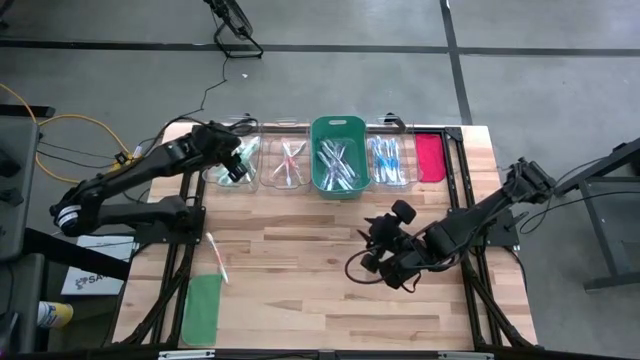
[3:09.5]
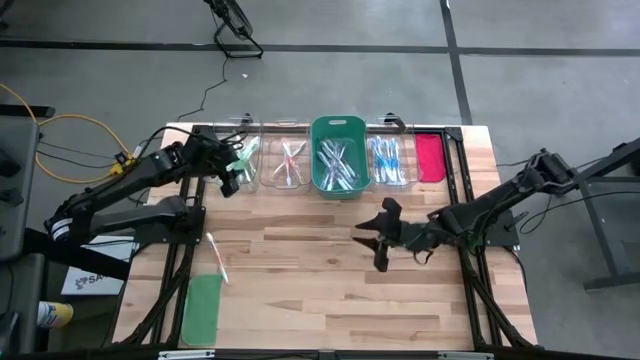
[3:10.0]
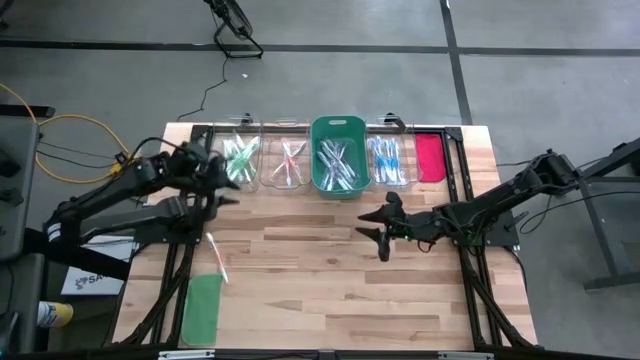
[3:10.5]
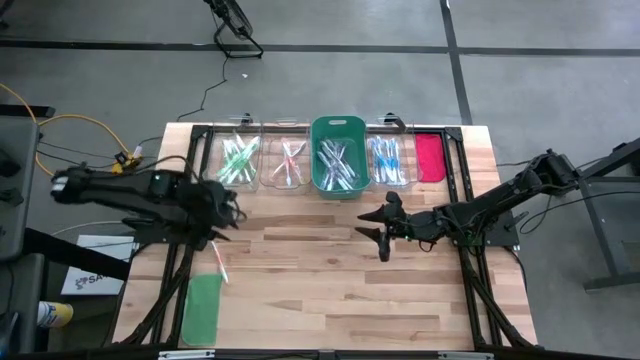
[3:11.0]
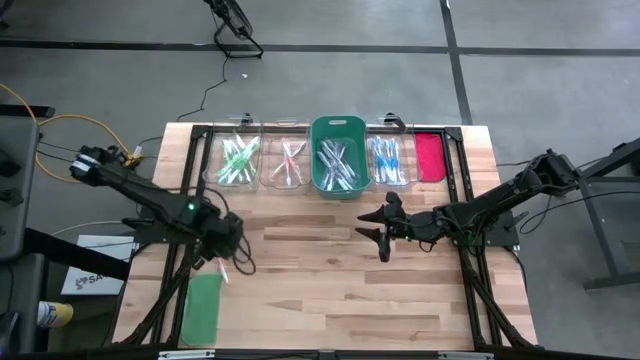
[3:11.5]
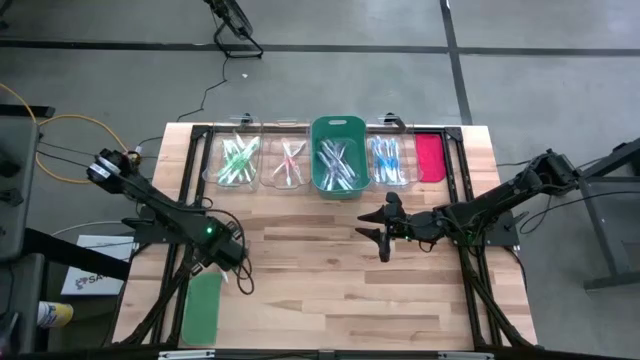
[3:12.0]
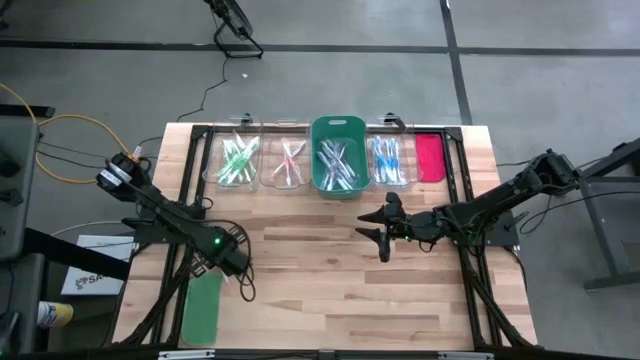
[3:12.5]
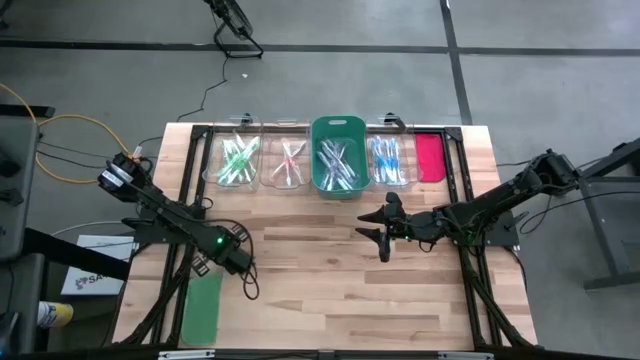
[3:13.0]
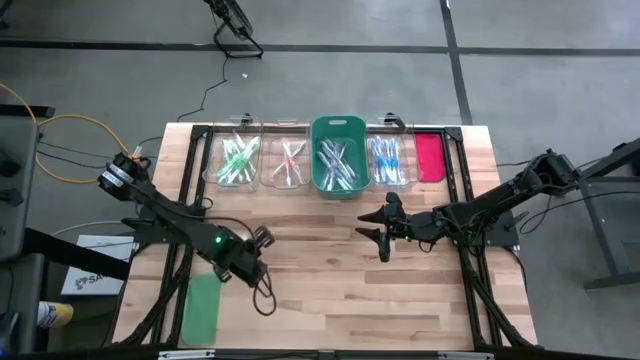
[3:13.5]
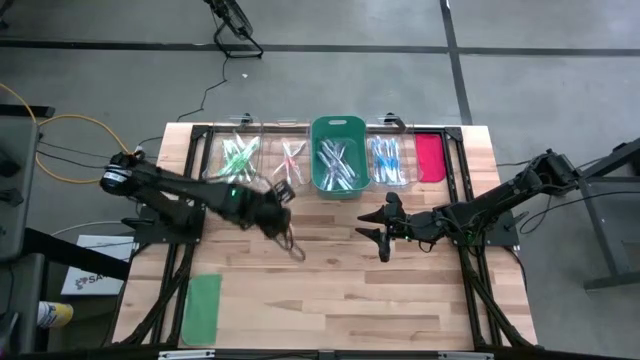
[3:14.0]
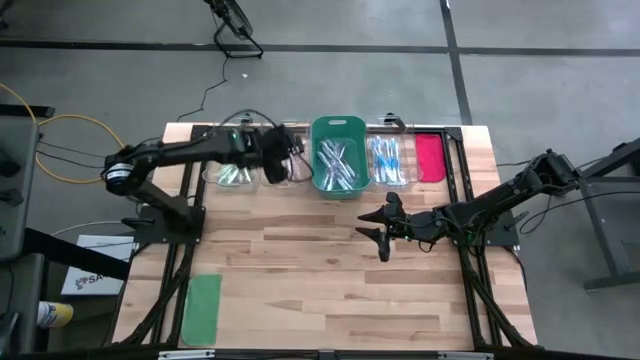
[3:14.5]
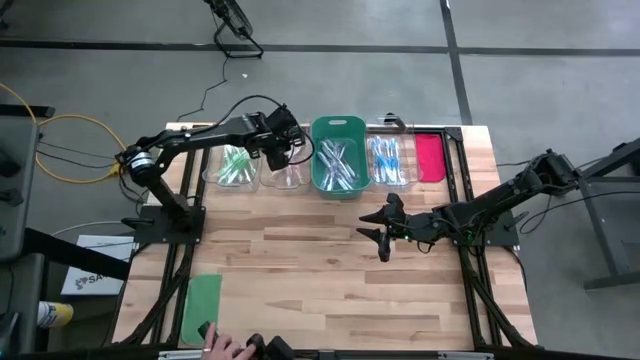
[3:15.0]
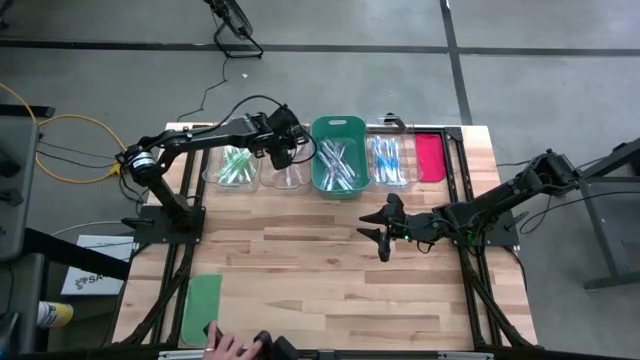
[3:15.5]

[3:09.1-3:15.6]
Task: Pick & Place Toothbrushes
Put the orange toothbrush into the middle transparent bin

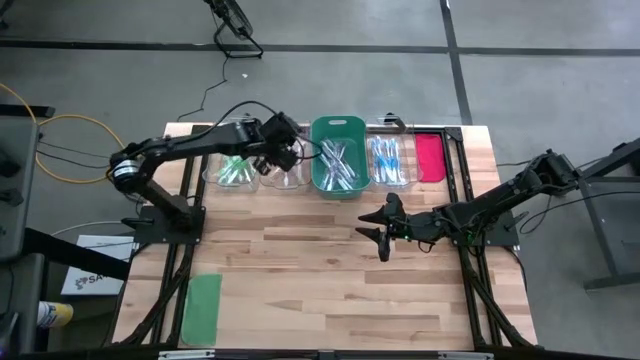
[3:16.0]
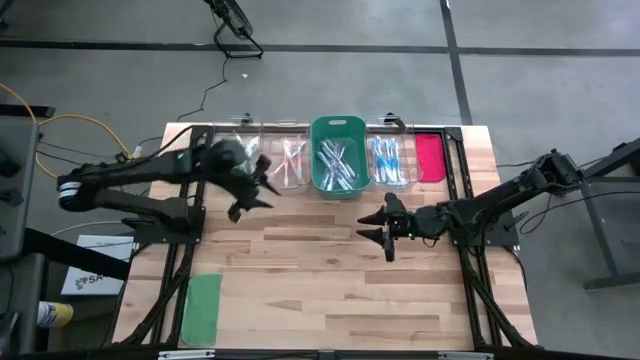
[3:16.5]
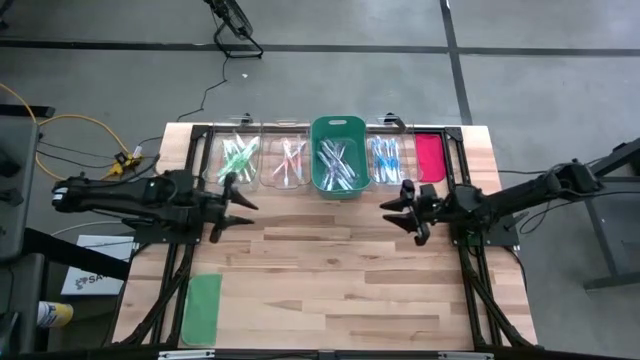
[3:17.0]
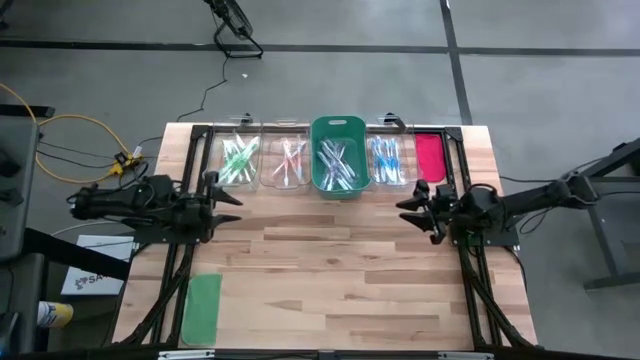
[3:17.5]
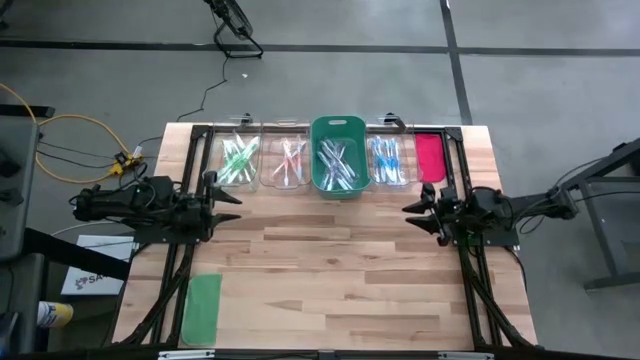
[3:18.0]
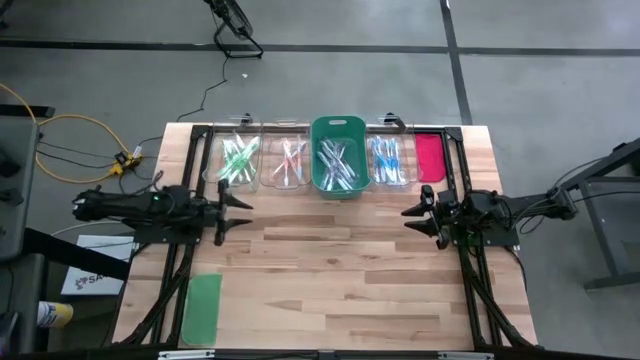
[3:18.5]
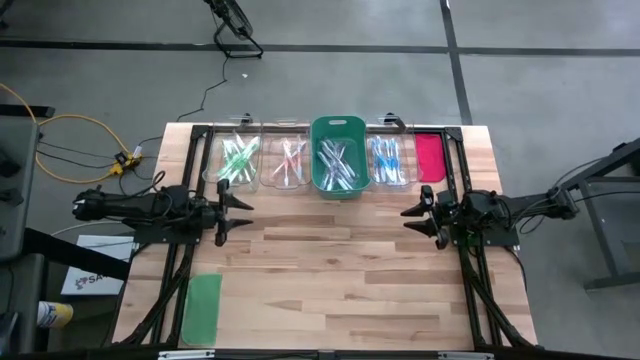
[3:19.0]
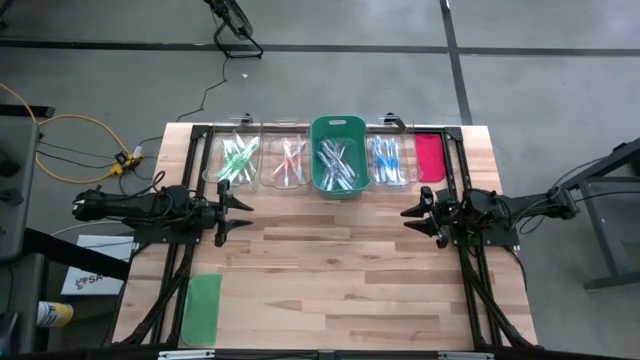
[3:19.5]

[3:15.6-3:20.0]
Return to Home Position

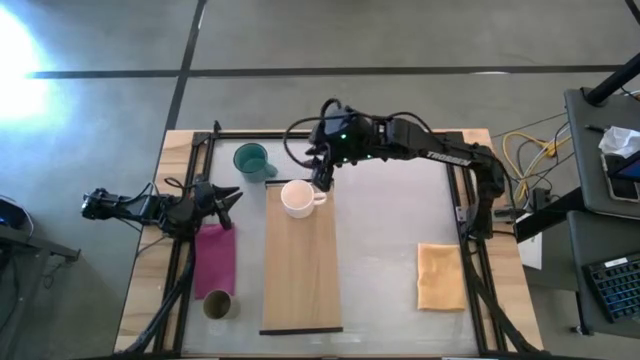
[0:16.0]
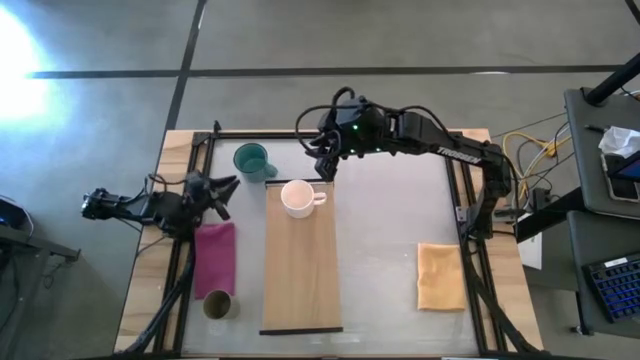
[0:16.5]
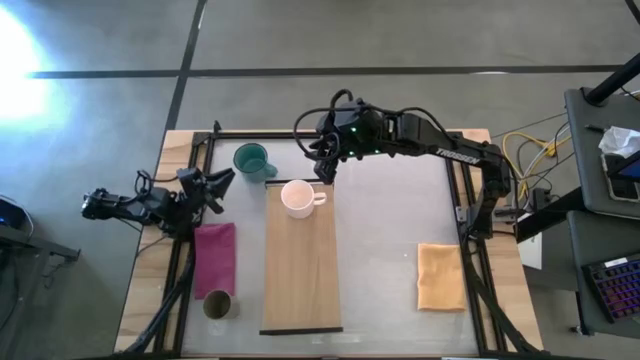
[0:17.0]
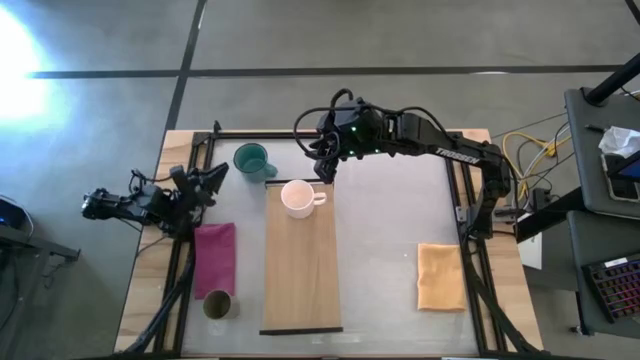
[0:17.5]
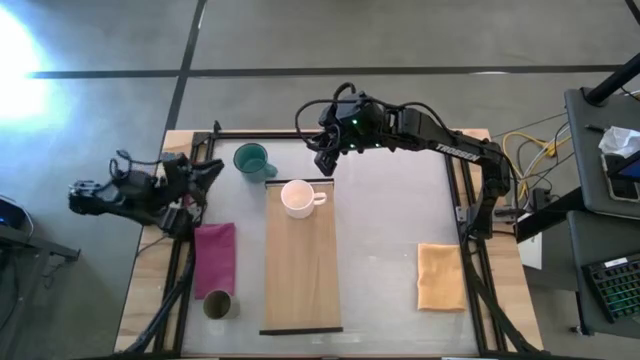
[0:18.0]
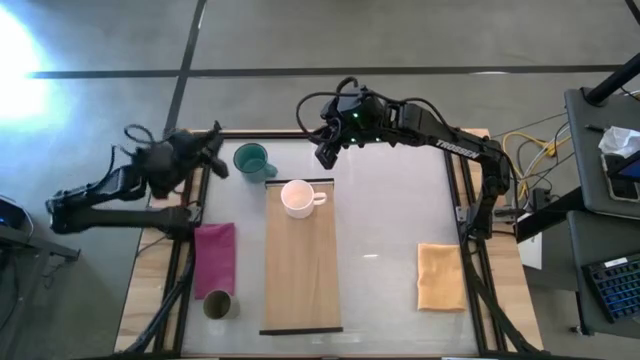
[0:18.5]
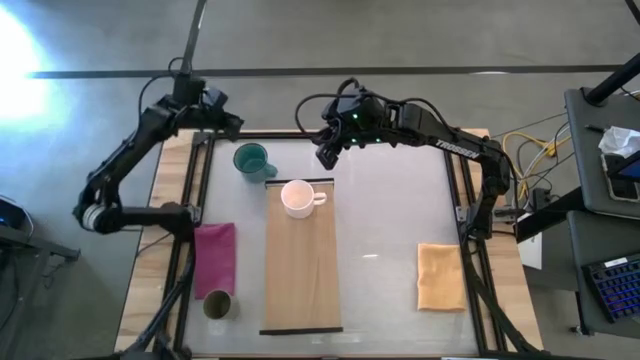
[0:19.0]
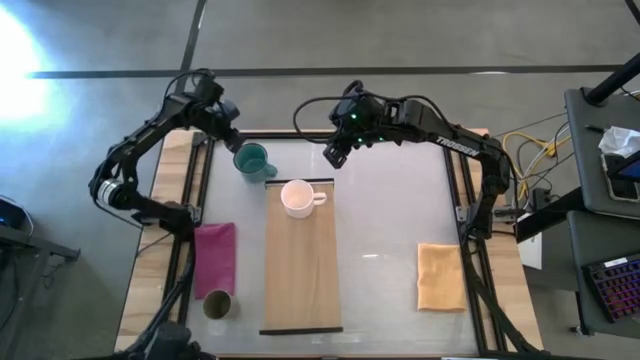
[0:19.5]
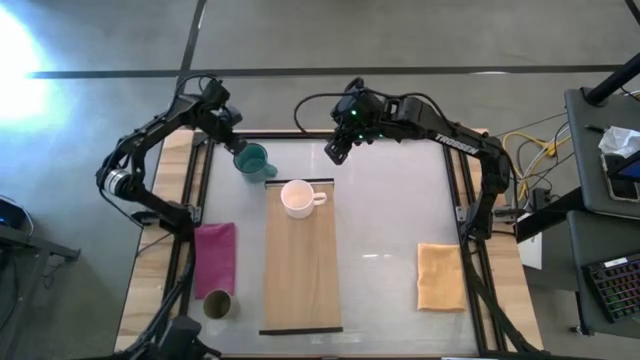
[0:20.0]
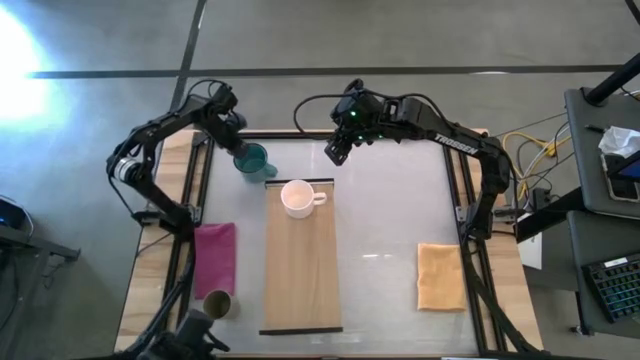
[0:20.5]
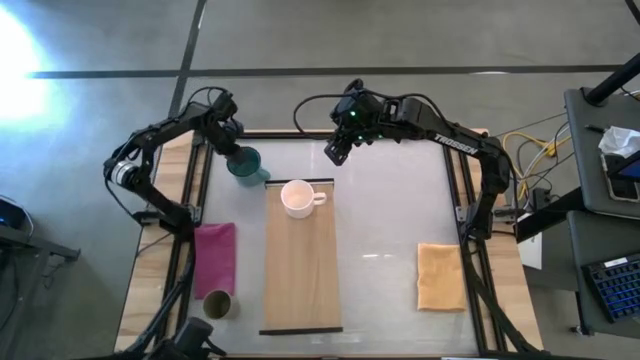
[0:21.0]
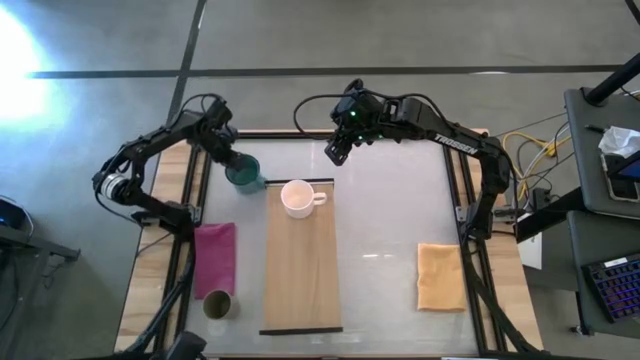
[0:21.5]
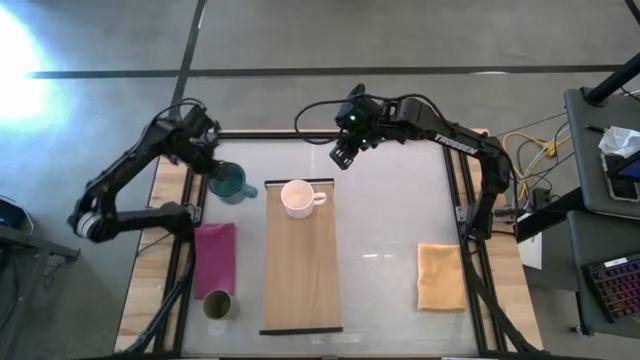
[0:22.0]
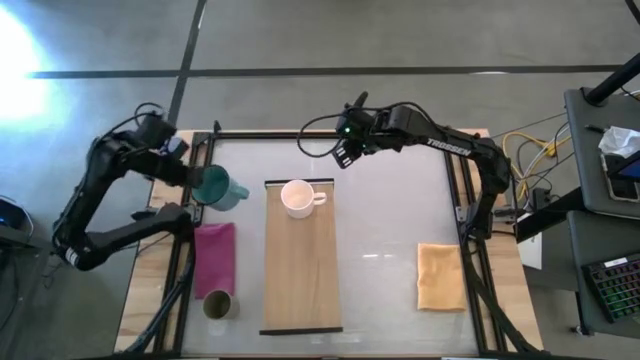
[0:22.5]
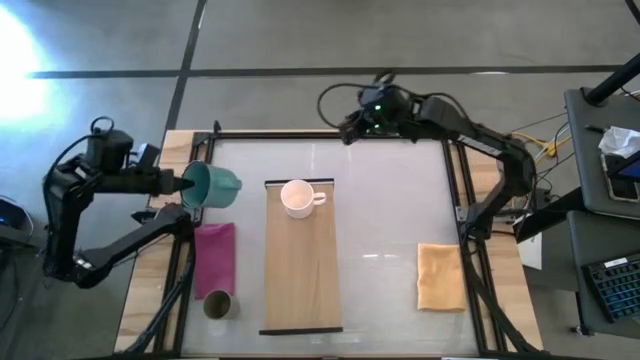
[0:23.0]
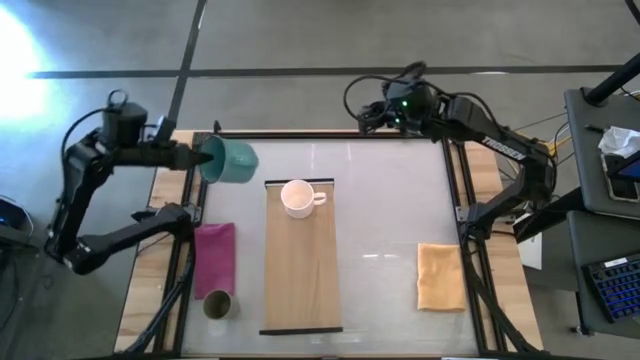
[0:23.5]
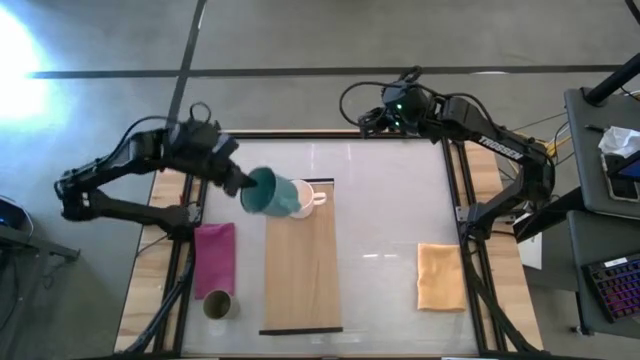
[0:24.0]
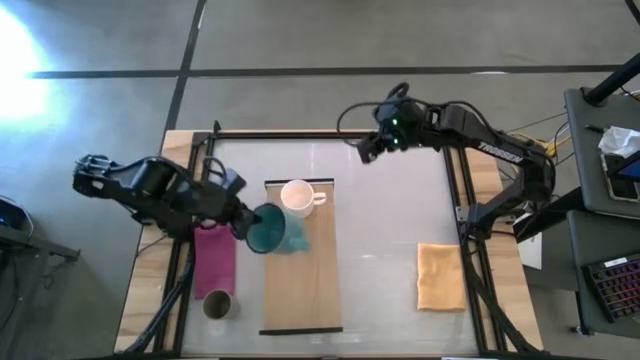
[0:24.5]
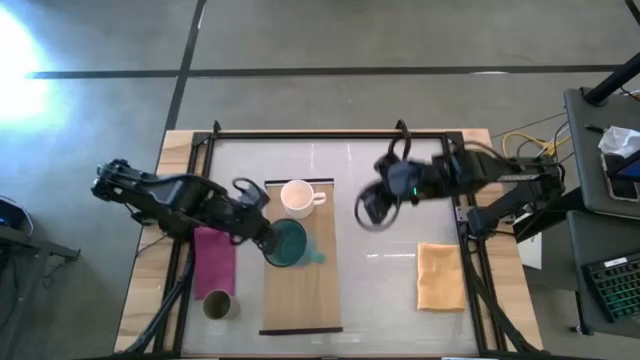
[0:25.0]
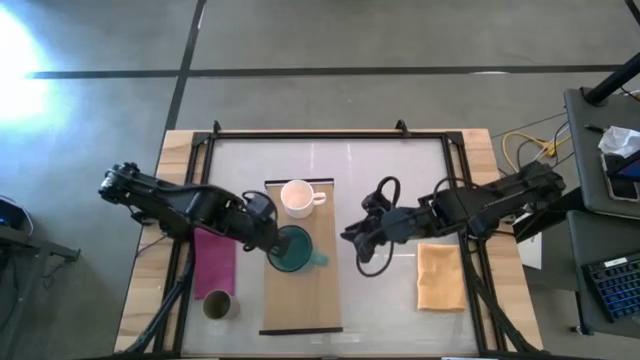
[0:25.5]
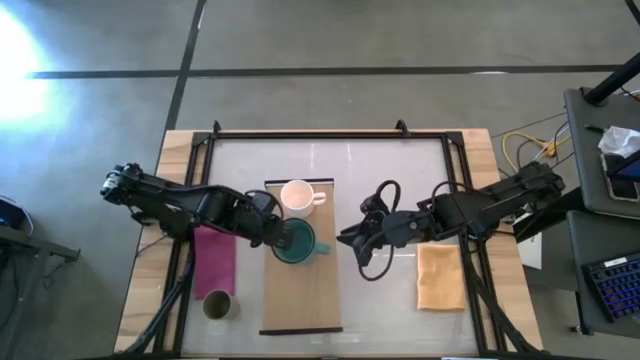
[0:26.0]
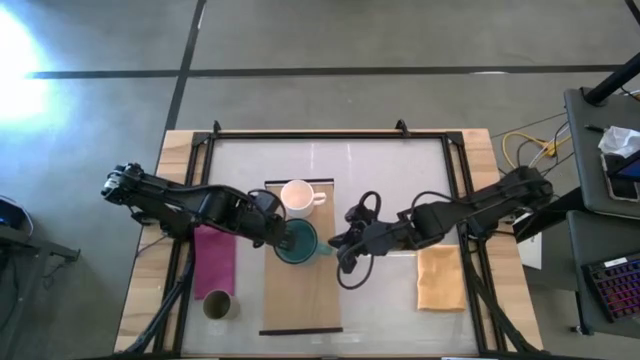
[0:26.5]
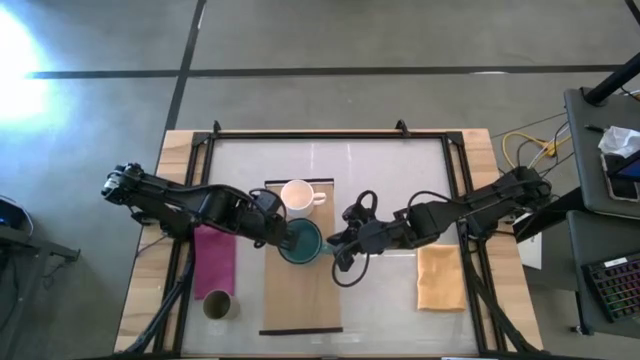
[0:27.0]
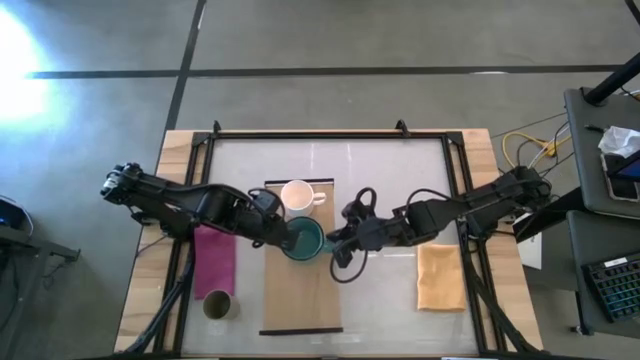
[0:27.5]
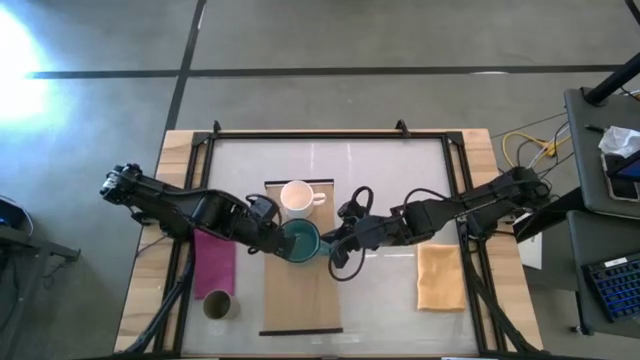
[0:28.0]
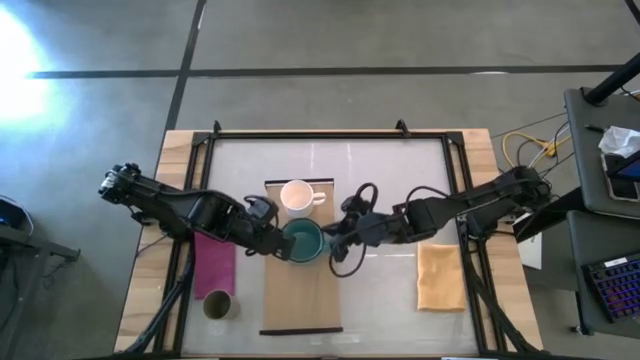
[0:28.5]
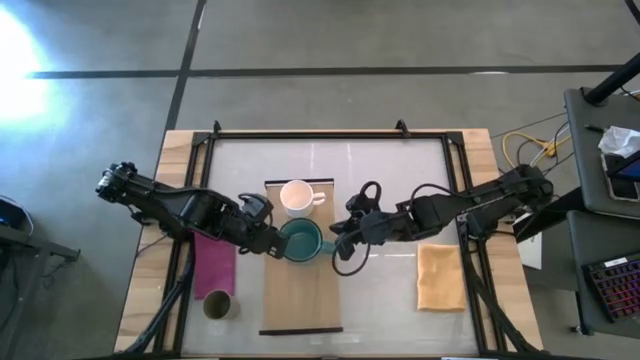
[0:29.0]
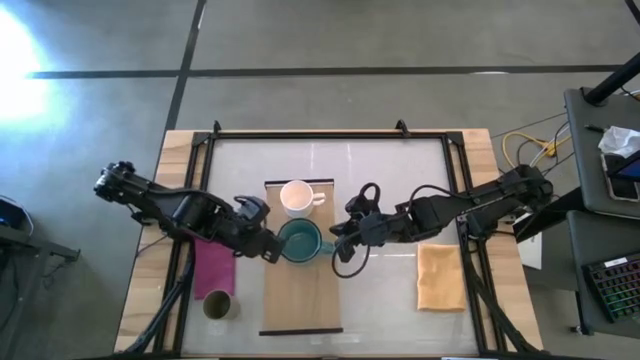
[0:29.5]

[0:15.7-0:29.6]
Task: Stack small to large cups/mugs on shelf
Put the blue mug on the shelf
